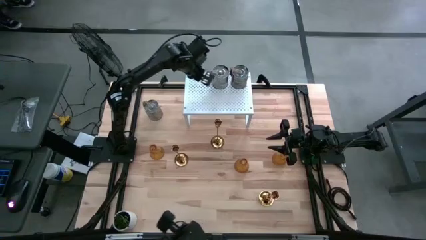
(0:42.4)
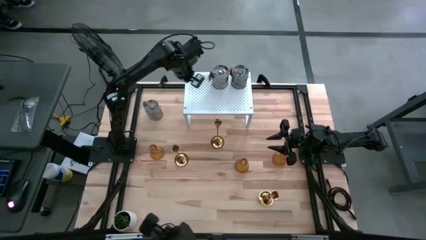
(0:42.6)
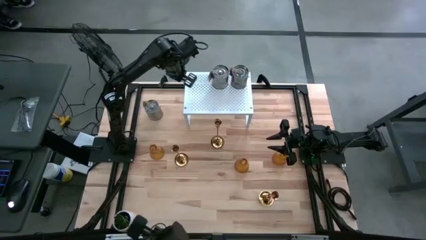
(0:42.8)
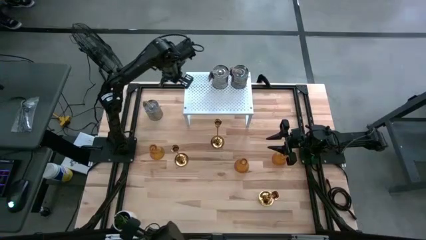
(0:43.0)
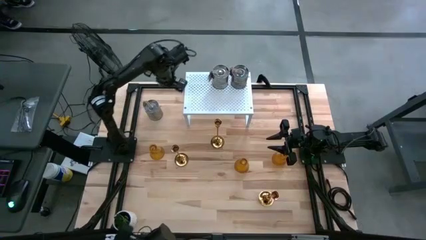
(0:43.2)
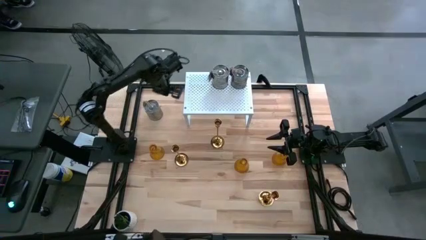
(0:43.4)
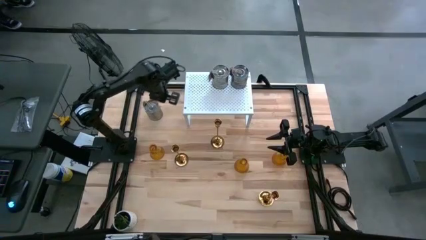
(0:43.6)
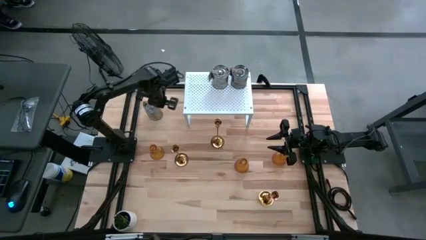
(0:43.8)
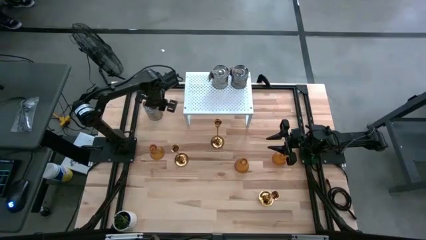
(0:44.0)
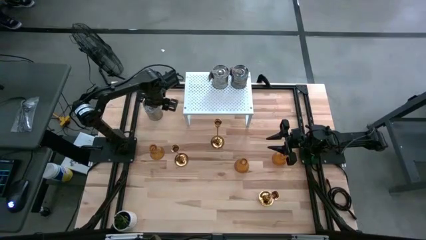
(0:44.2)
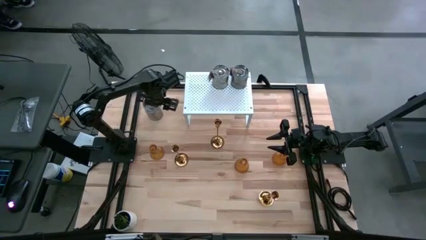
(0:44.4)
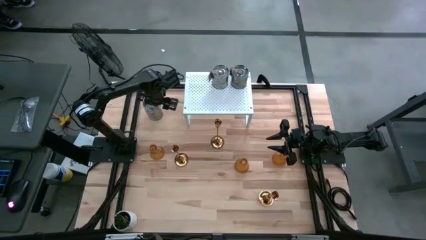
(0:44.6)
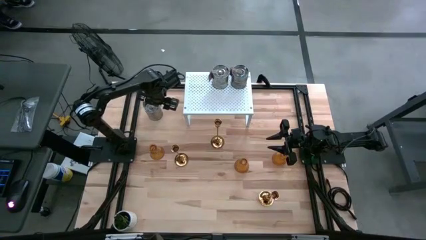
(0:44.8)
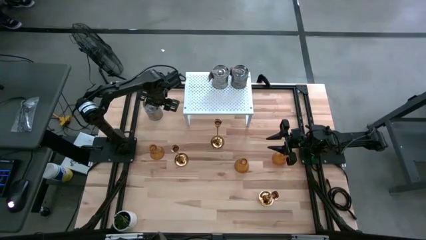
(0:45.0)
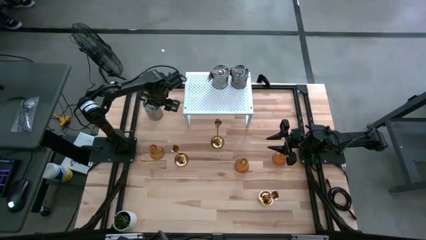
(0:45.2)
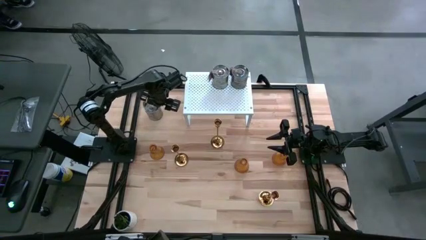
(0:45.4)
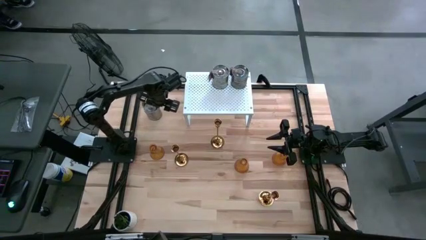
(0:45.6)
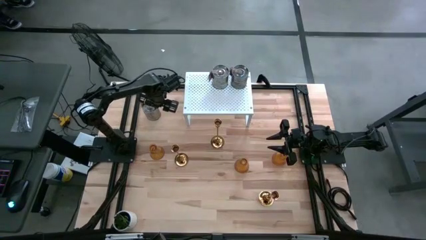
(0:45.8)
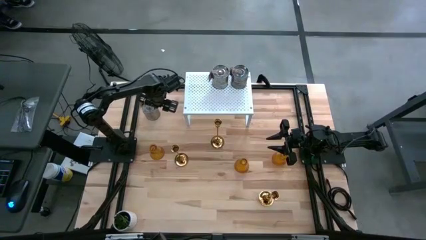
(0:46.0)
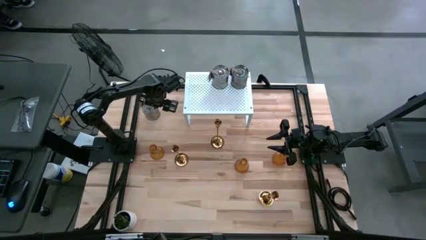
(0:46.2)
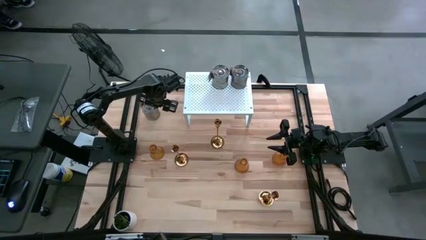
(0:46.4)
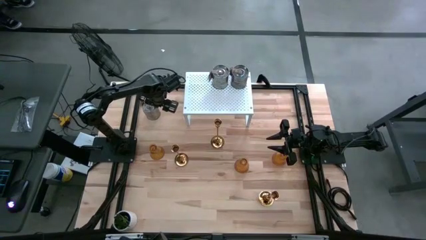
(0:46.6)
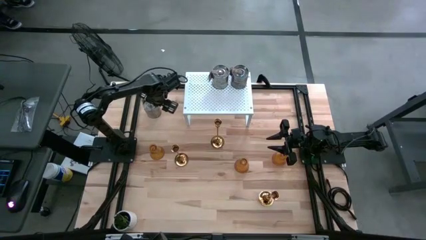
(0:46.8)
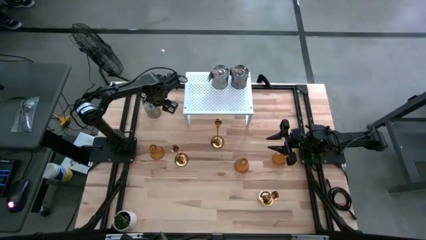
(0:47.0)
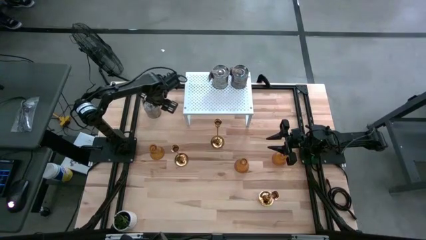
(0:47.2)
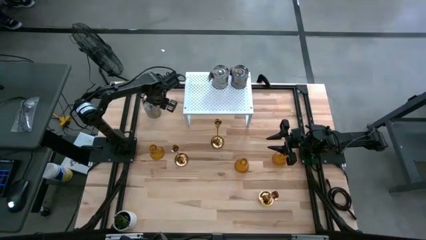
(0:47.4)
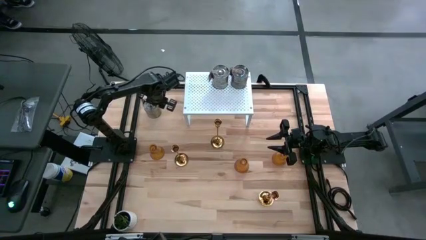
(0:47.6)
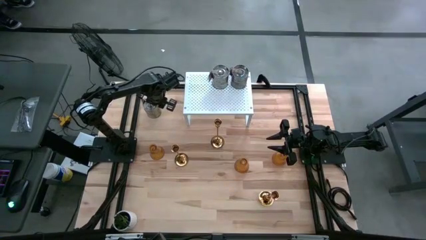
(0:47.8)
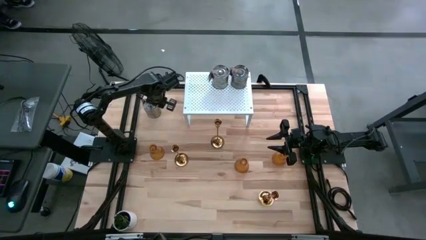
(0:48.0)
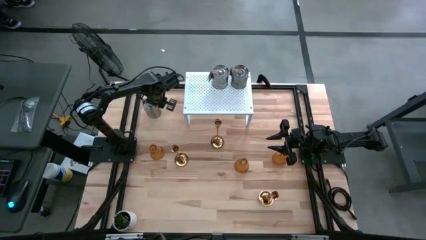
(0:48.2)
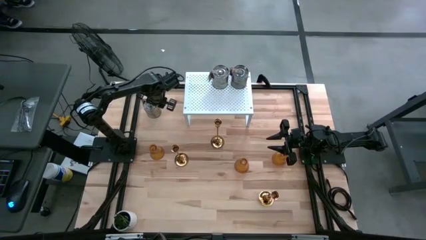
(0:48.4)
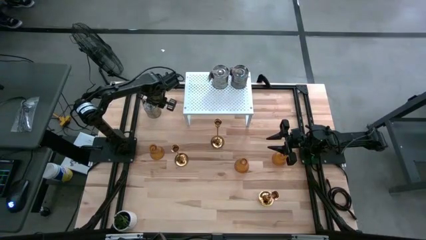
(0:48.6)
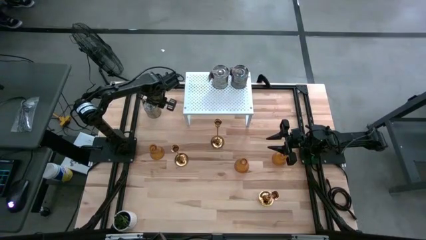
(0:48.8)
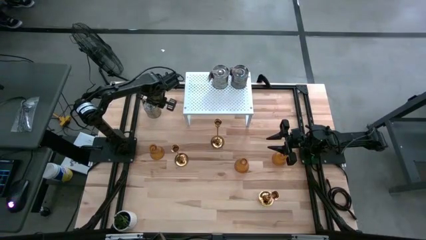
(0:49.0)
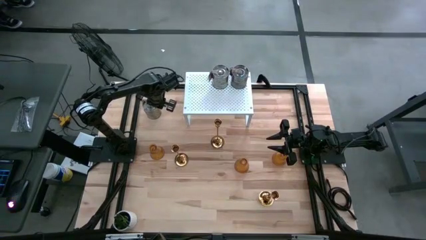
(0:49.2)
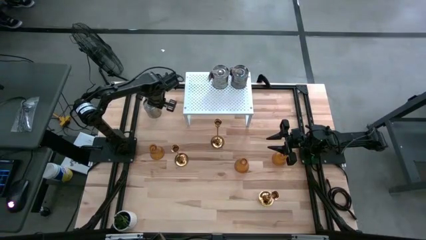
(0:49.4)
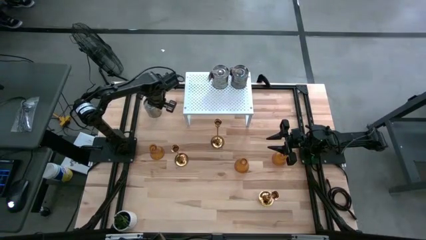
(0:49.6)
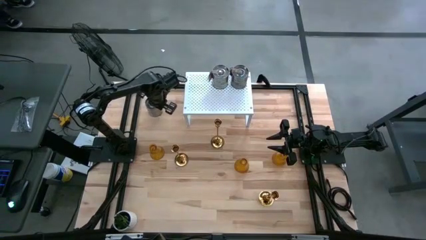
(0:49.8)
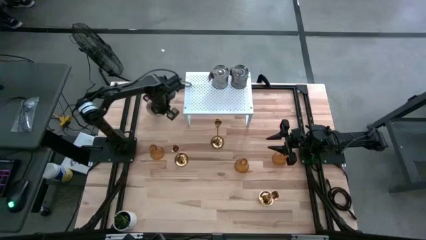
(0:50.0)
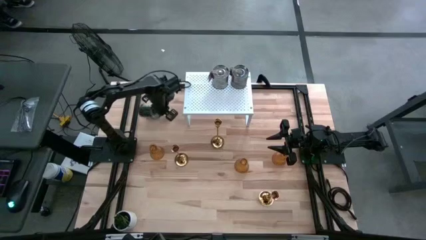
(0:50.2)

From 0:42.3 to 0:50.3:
Task: Pick & Place candle stick holders
Put the silver scented candle aligned with the other silver scented candles on the shelf

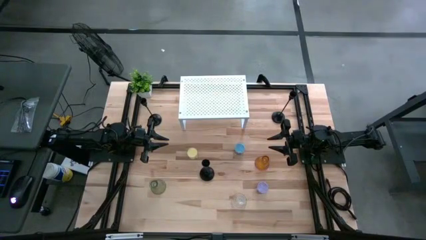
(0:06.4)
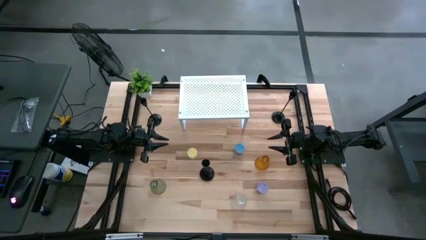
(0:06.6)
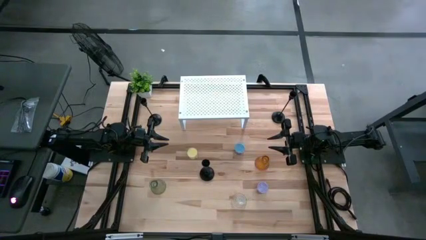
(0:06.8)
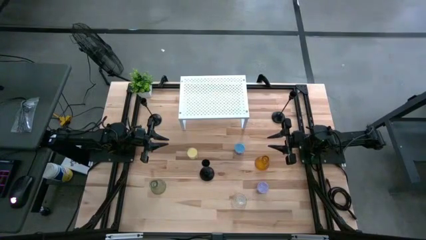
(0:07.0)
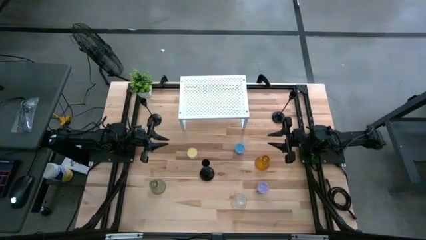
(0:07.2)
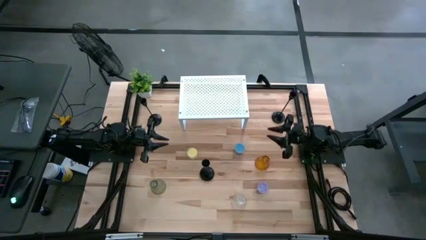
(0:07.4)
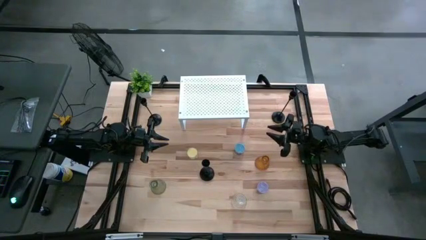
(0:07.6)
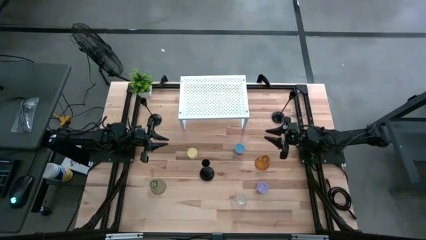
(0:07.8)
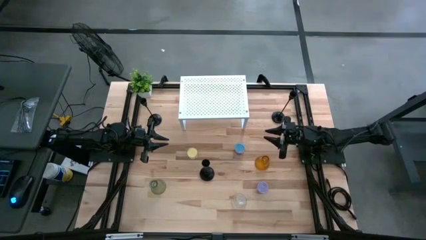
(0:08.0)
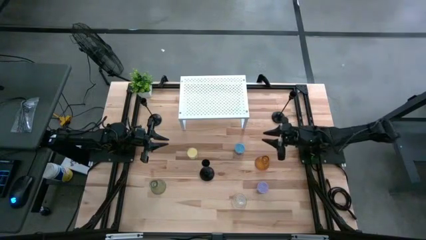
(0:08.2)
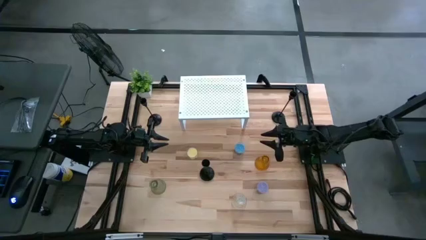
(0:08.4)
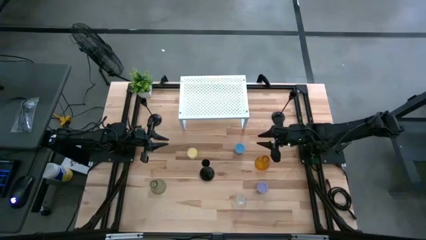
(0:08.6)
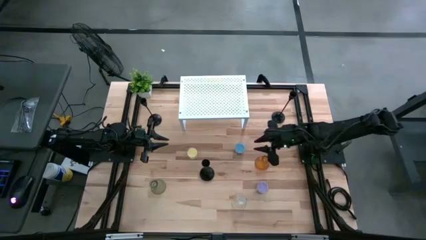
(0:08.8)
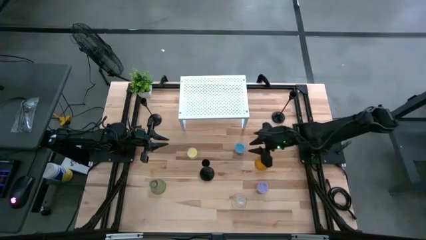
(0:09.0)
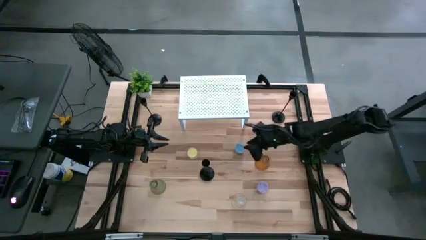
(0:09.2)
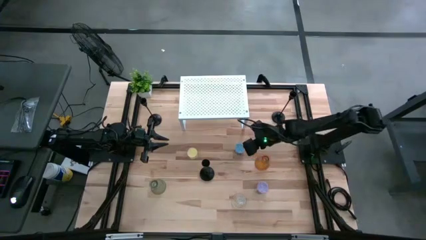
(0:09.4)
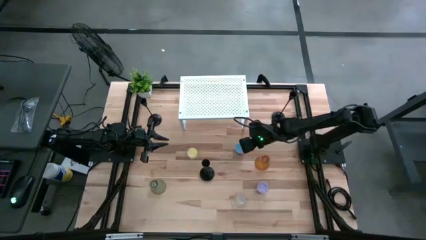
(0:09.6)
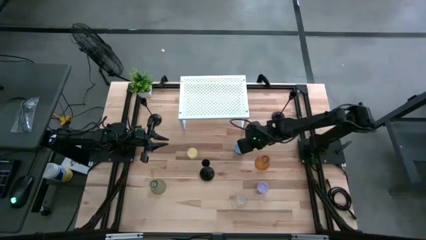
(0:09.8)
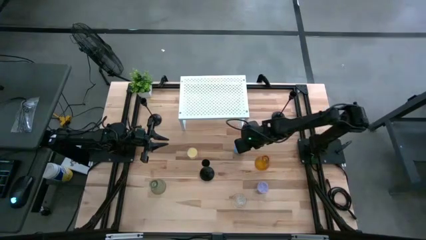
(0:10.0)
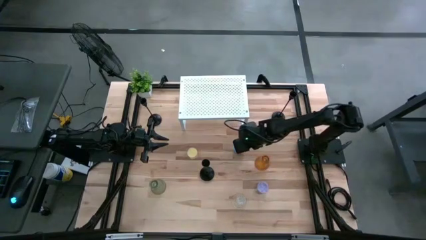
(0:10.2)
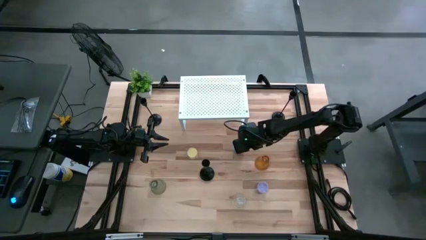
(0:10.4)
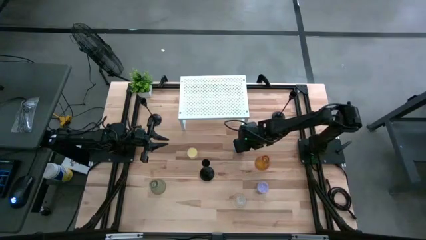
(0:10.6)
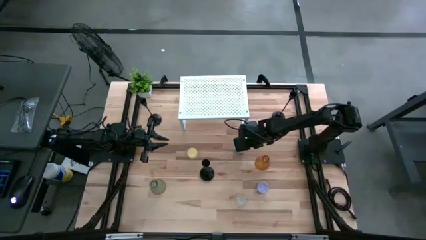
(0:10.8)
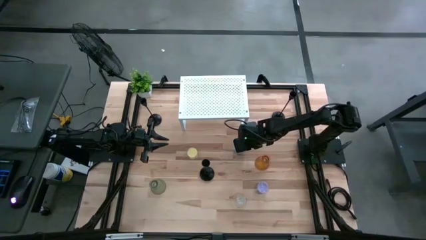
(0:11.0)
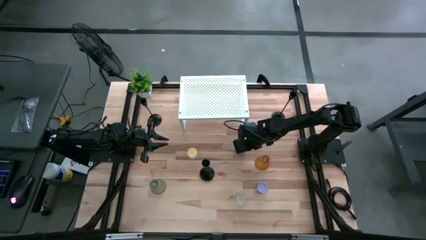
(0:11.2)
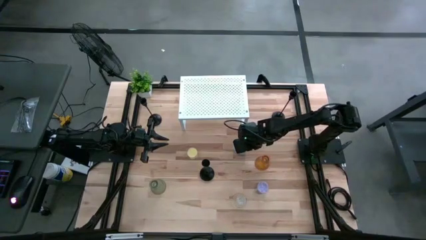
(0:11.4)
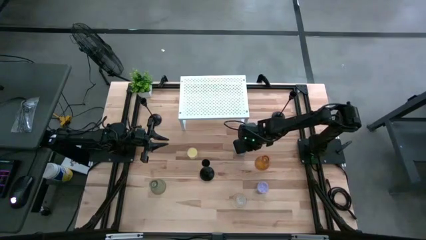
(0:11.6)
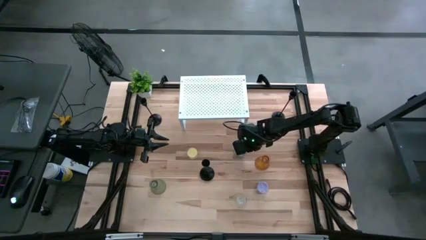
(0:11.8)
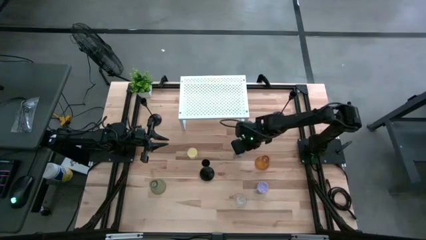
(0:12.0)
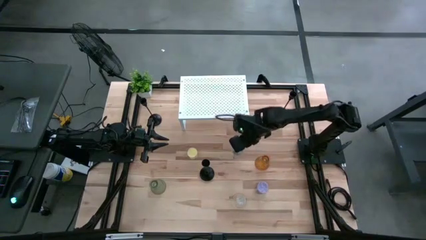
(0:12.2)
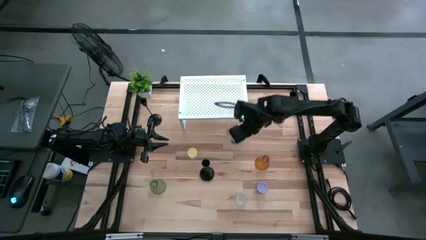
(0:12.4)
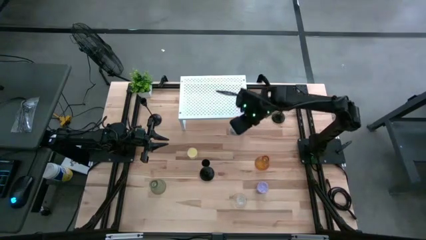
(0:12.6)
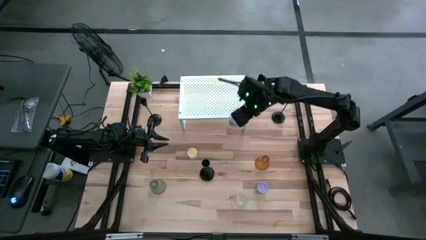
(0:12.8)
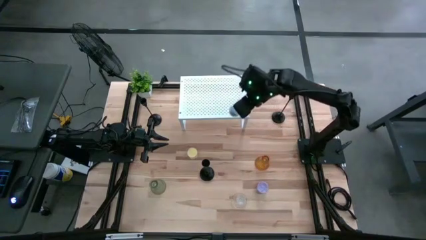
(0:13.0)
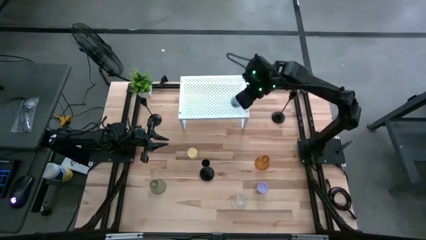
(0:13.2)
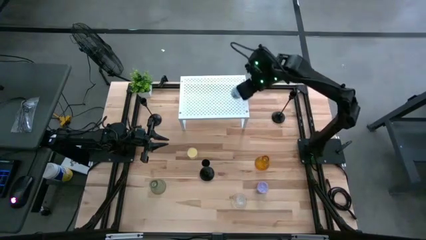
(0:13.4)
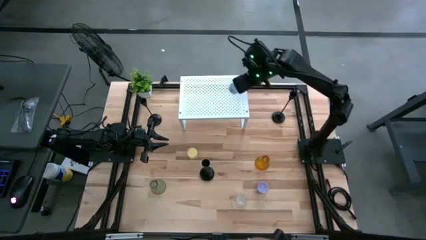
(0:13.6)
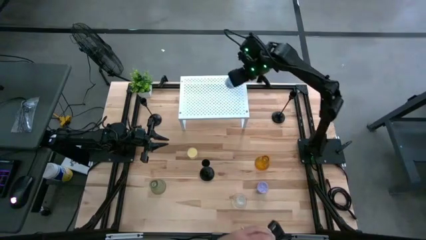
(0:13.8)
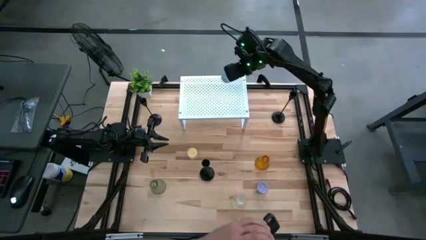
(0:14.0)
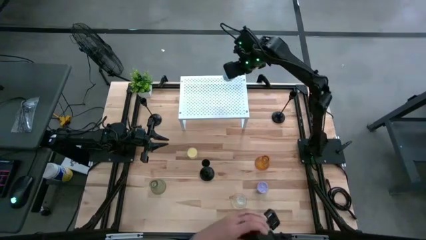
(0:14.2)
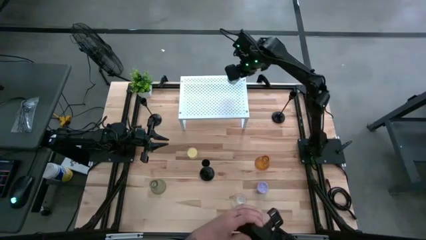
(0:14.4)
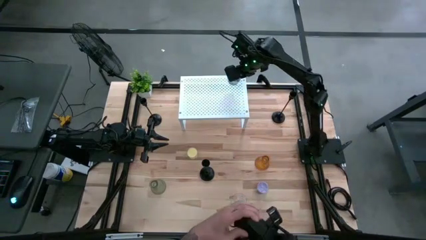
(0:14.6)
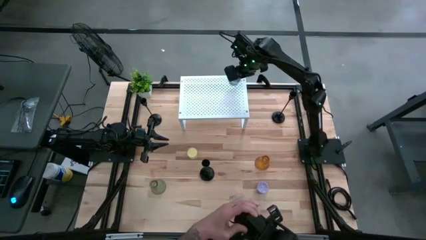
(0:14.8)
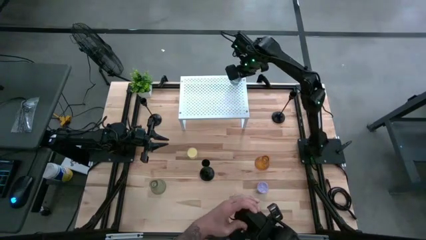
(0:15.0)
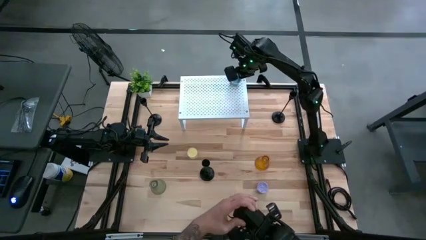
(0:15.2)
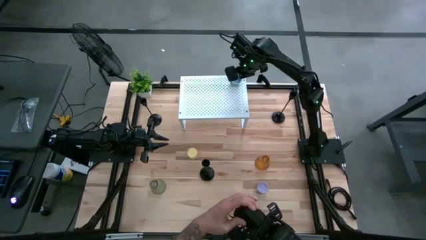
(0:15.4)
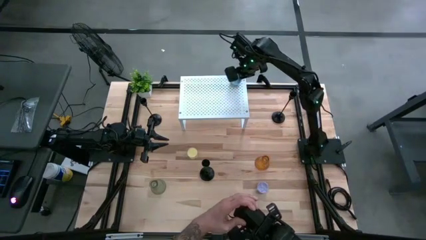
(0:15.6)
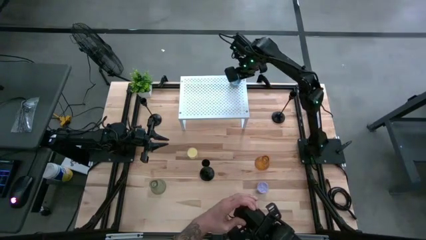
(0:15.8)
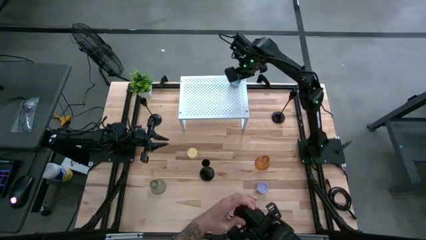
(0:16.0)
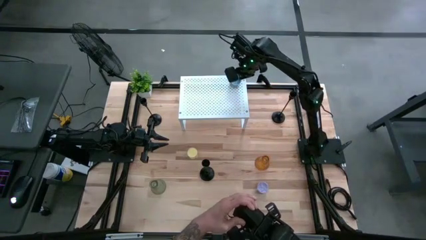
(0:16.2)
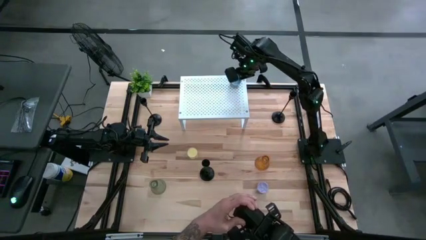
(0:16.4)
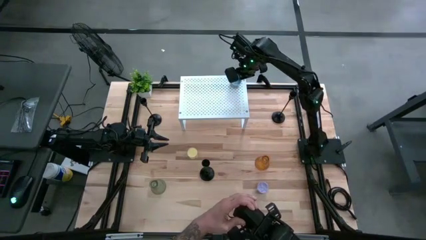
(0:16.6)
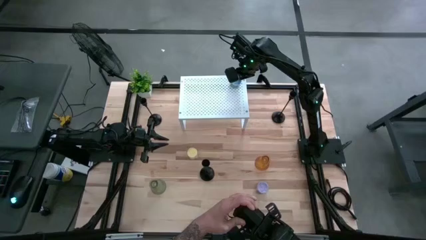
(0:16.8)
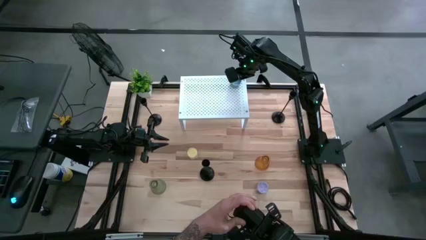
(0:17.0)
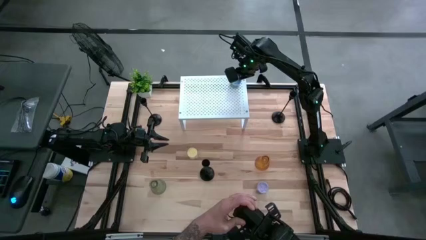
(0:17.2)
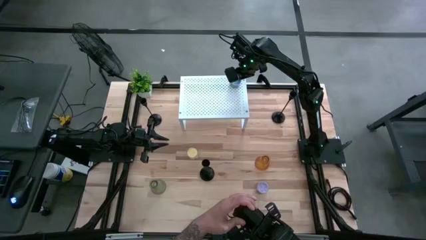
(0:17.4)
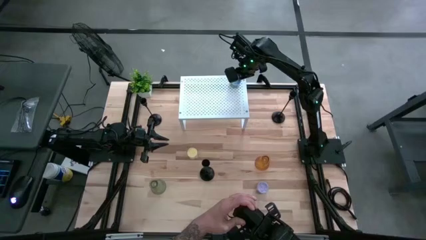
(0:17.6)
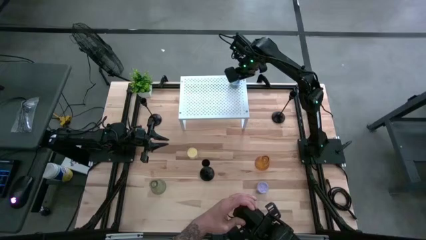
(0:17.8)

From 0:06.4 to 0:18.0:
Task: Pick & Place candle stick holders
Put the blue scented candle on the shelf
